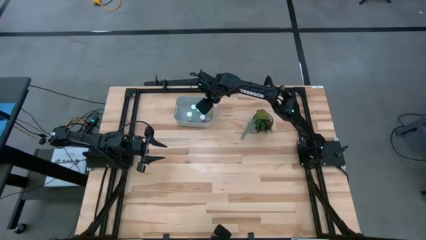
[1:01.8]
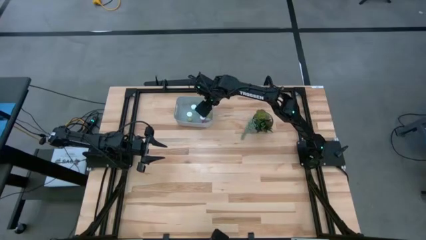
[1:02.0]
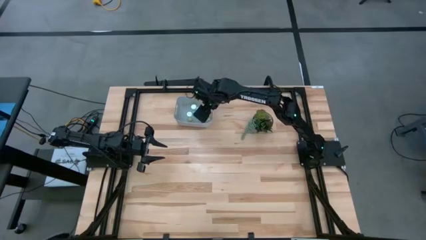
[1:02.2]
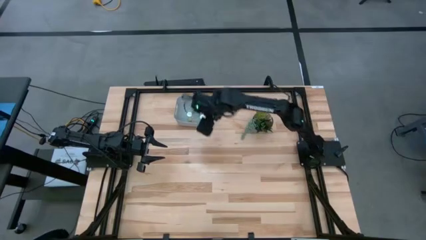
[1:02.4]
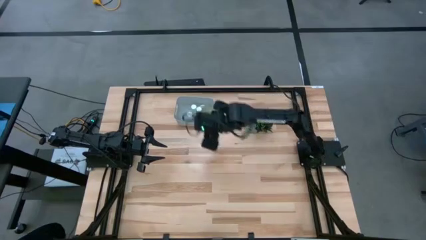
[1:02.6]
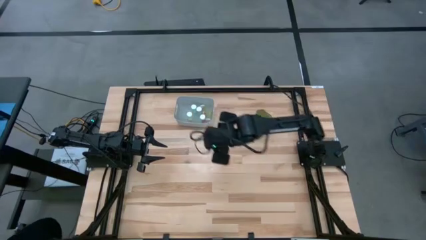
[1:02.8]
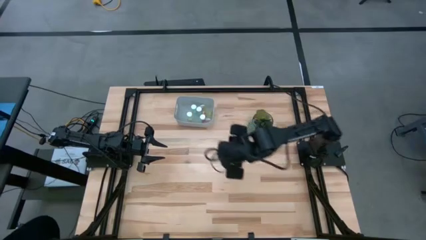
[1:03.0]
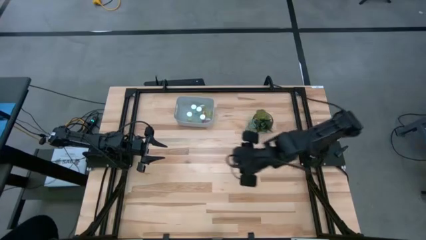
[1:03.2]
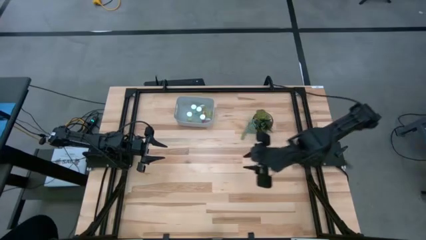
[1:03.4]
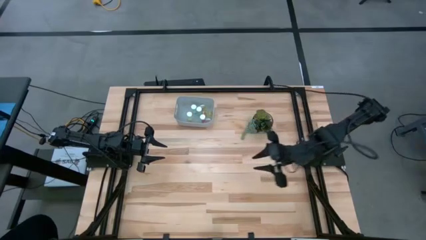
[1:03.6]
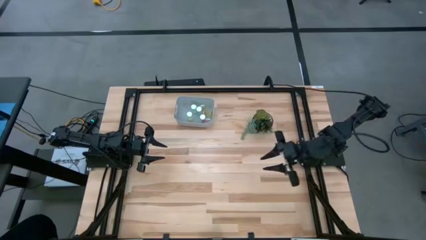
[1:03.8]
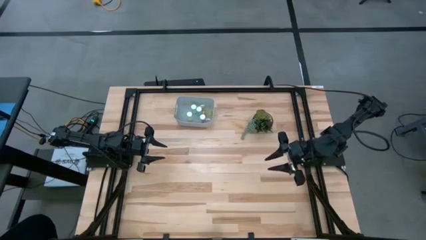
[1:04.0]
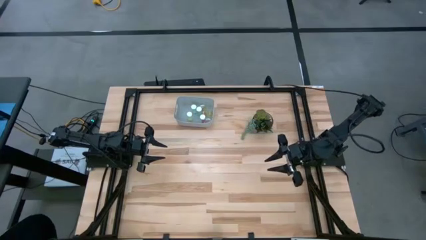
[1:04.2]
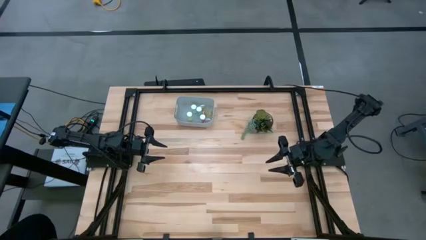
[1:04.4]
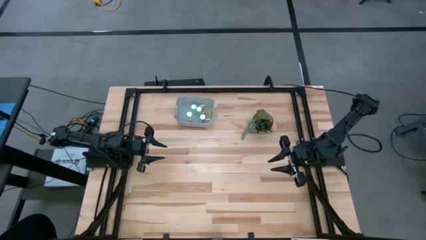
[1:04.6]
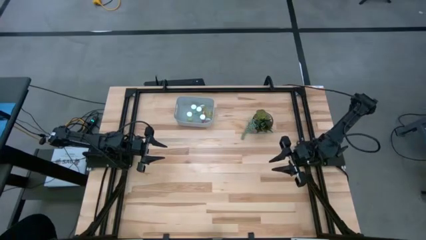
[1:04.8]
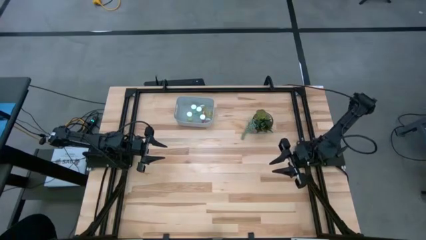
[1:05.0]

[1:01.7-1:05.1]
Task: Pick and place pill bottles into a basket
Return to Home Position

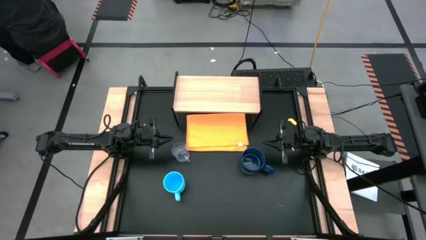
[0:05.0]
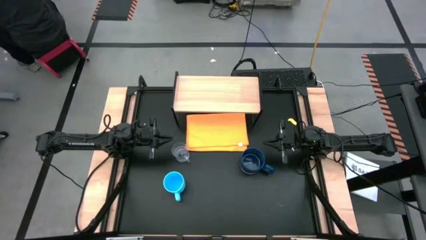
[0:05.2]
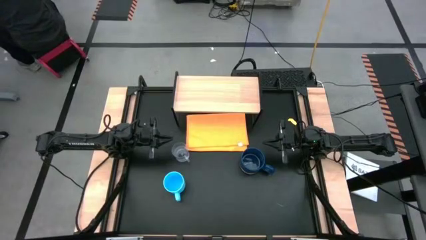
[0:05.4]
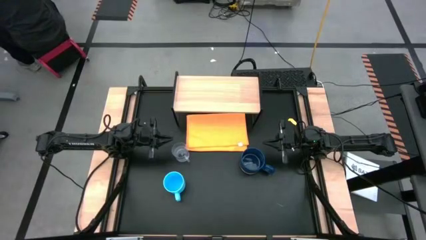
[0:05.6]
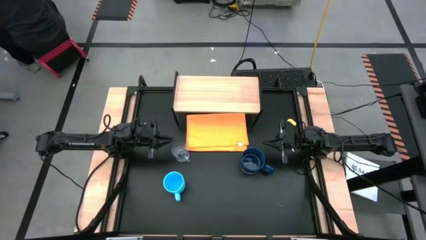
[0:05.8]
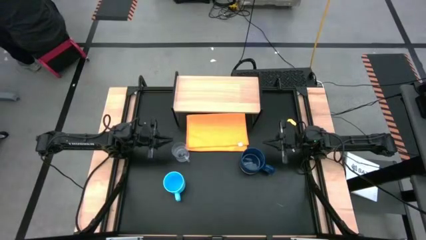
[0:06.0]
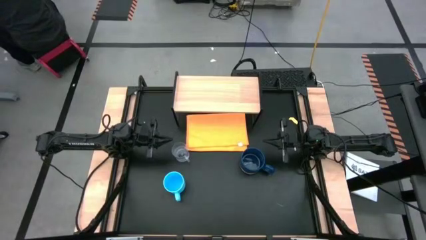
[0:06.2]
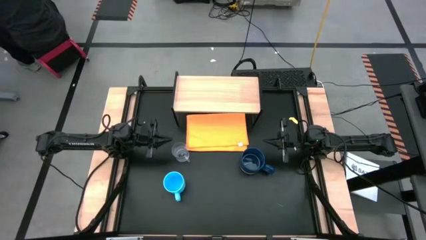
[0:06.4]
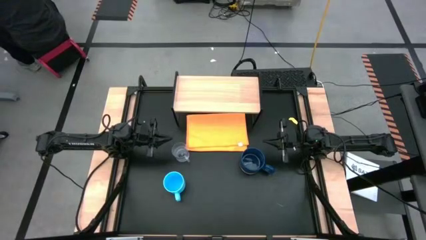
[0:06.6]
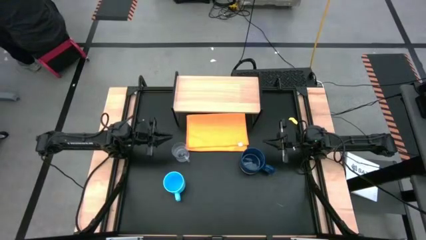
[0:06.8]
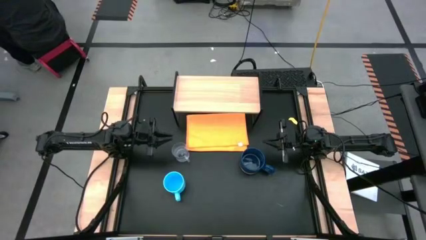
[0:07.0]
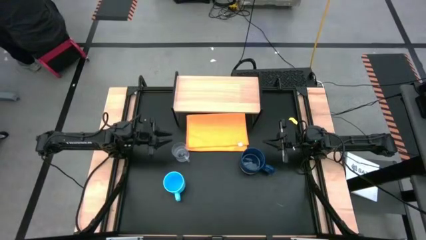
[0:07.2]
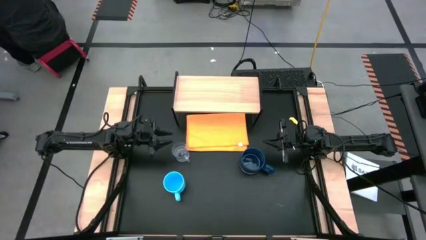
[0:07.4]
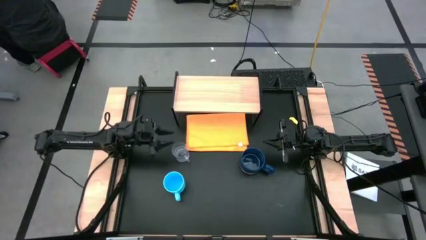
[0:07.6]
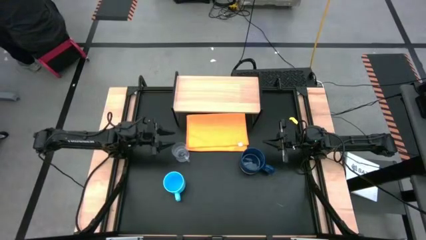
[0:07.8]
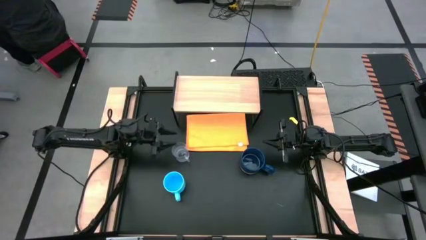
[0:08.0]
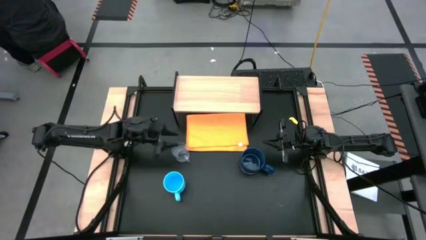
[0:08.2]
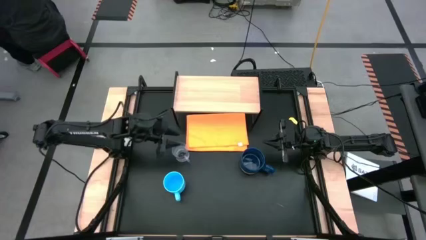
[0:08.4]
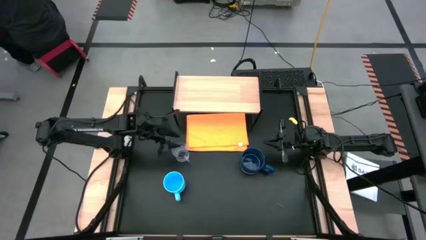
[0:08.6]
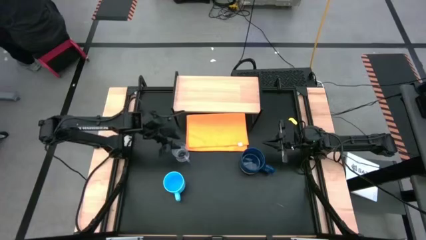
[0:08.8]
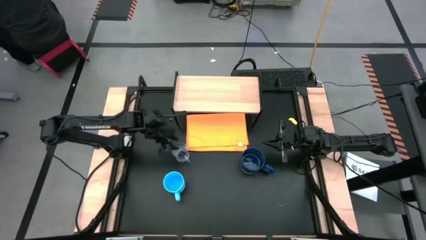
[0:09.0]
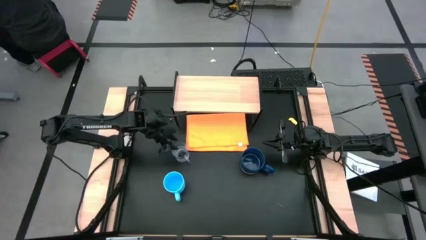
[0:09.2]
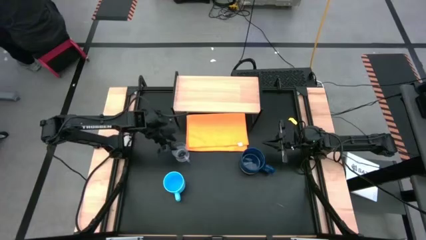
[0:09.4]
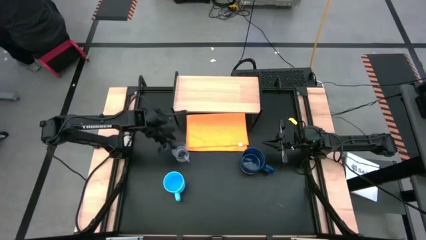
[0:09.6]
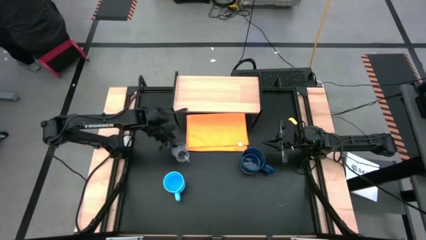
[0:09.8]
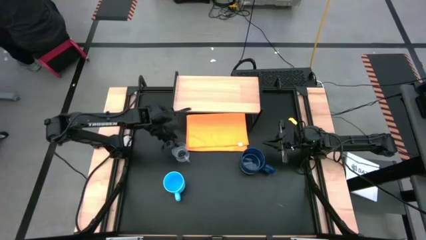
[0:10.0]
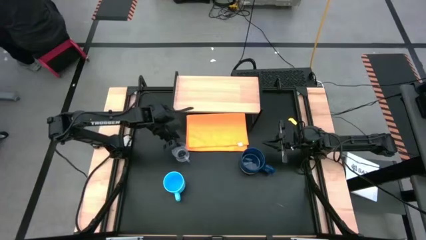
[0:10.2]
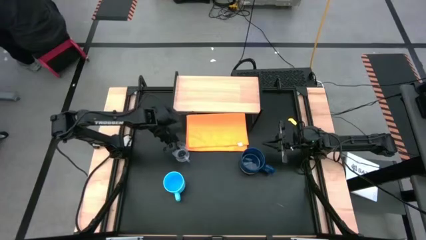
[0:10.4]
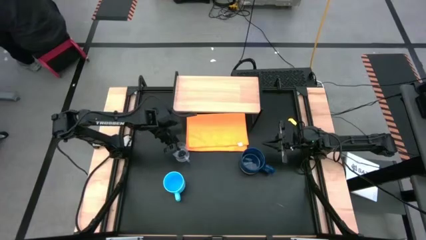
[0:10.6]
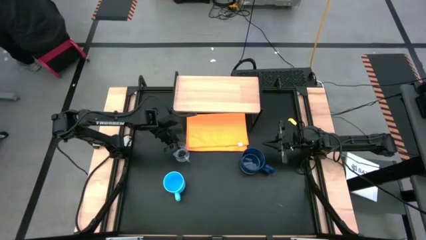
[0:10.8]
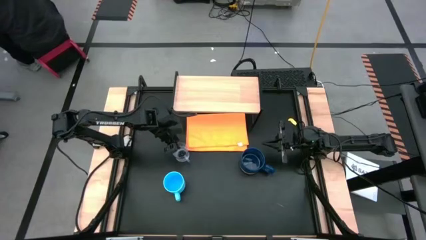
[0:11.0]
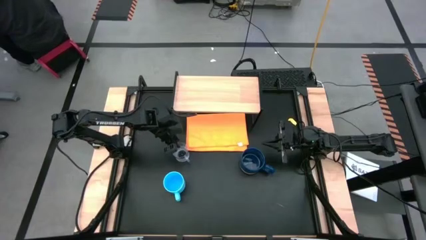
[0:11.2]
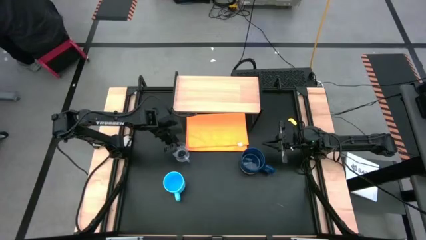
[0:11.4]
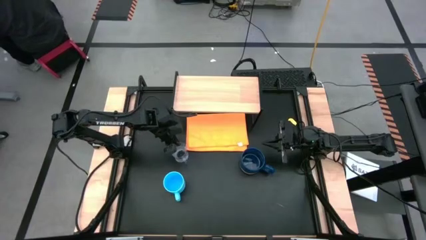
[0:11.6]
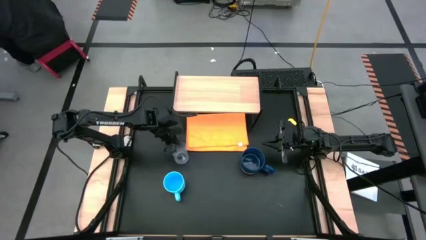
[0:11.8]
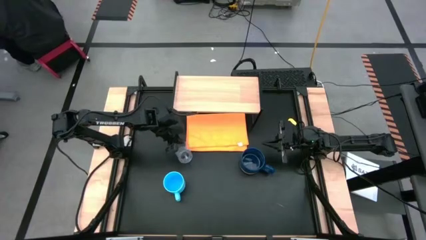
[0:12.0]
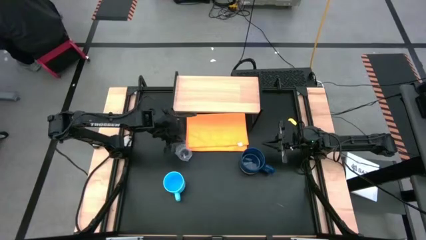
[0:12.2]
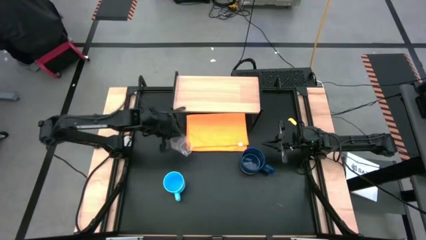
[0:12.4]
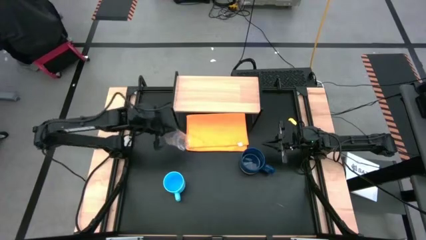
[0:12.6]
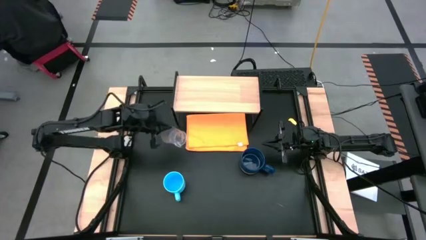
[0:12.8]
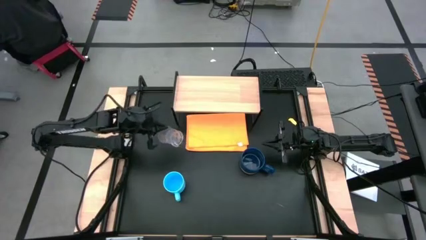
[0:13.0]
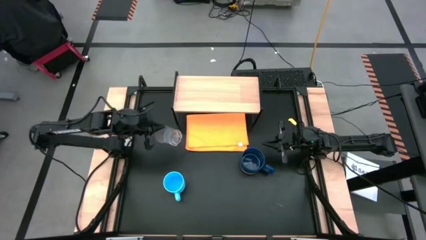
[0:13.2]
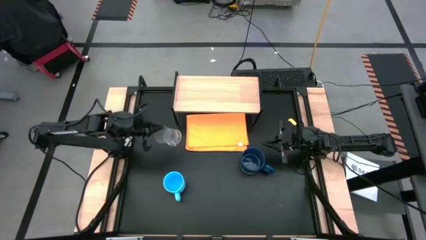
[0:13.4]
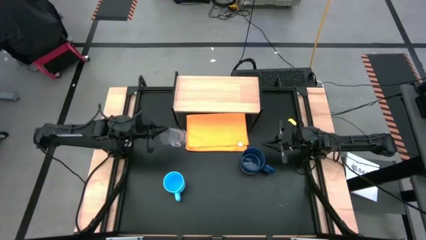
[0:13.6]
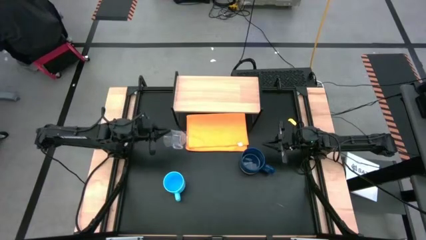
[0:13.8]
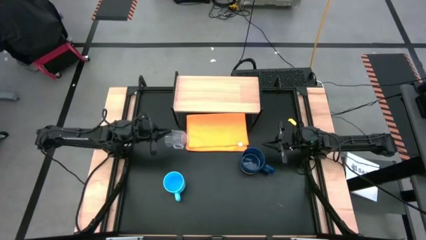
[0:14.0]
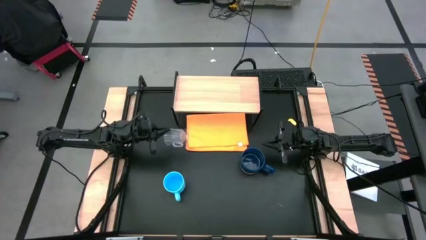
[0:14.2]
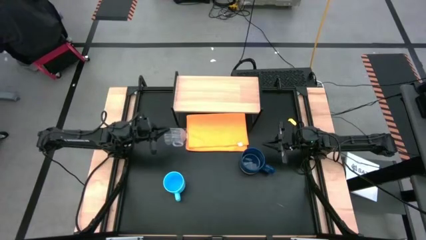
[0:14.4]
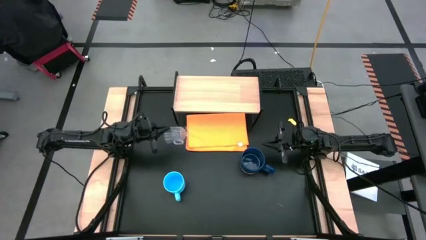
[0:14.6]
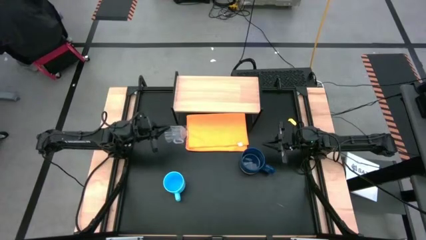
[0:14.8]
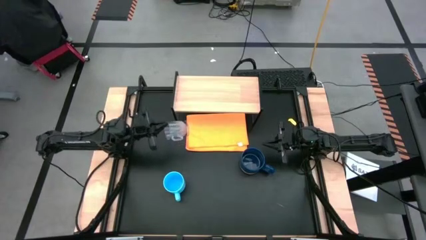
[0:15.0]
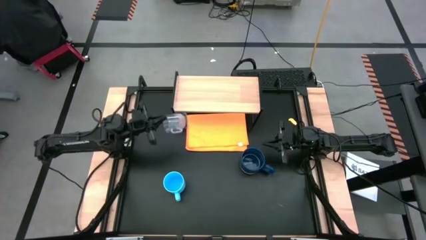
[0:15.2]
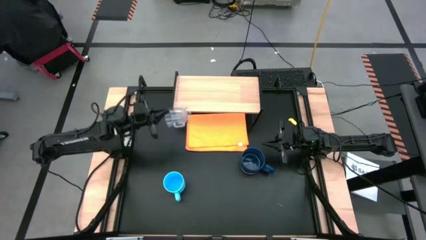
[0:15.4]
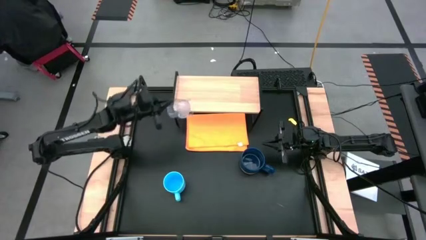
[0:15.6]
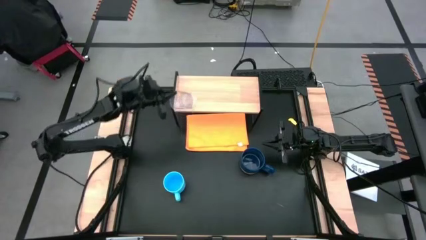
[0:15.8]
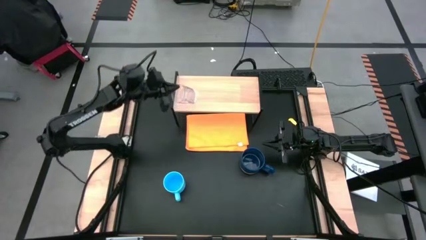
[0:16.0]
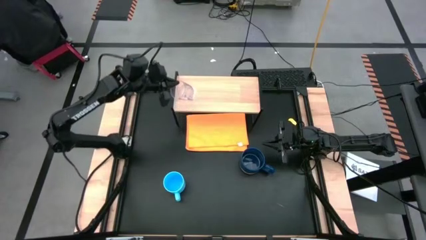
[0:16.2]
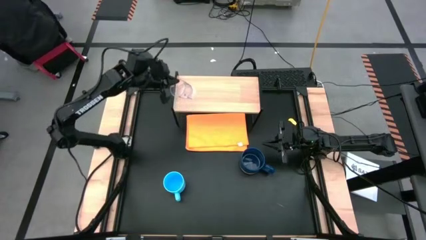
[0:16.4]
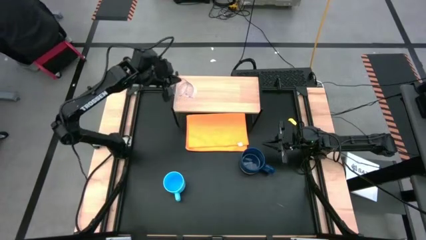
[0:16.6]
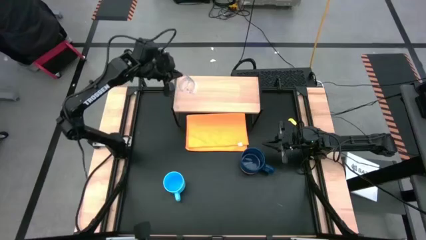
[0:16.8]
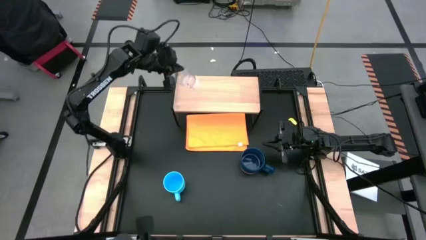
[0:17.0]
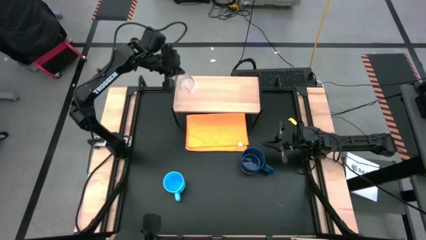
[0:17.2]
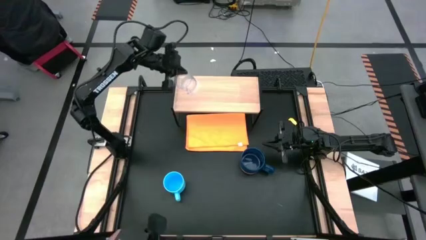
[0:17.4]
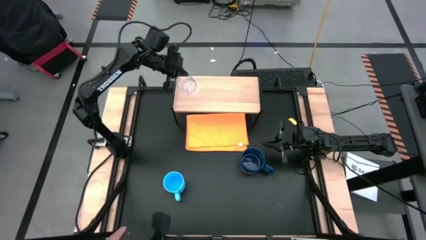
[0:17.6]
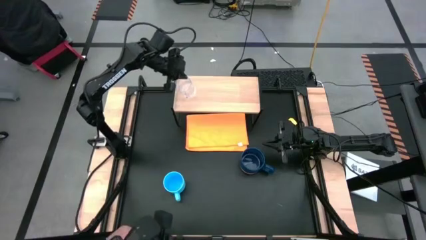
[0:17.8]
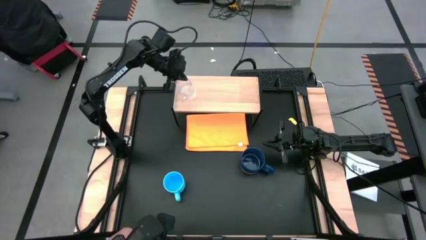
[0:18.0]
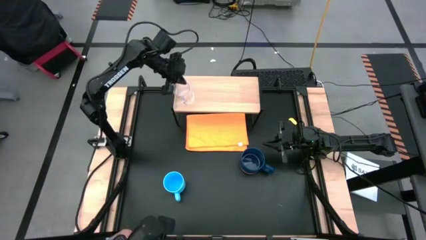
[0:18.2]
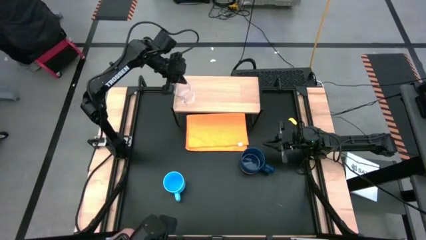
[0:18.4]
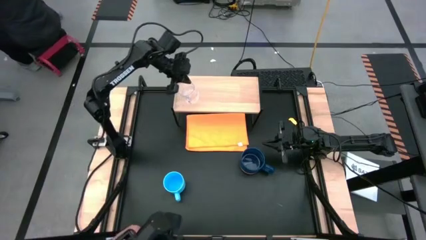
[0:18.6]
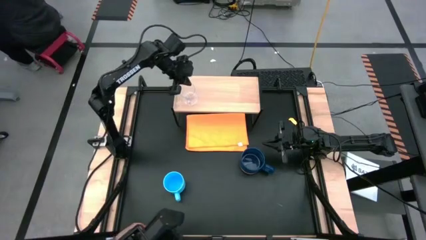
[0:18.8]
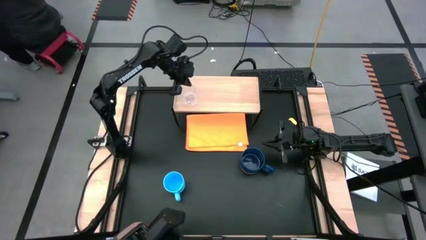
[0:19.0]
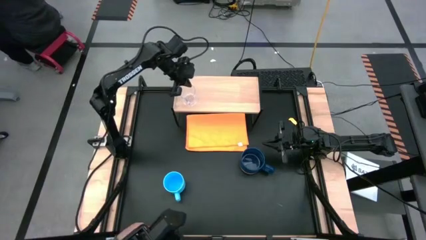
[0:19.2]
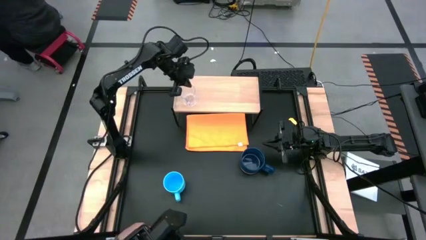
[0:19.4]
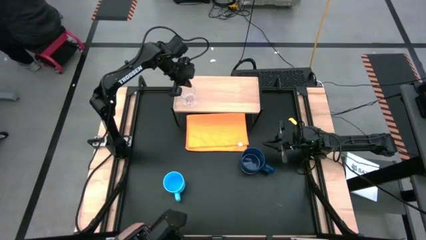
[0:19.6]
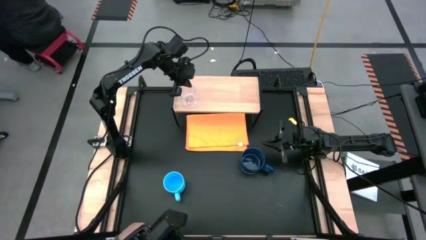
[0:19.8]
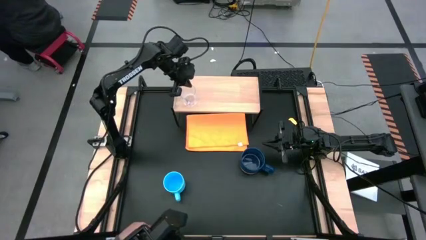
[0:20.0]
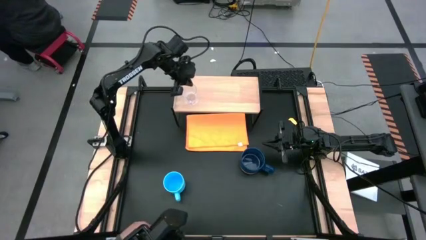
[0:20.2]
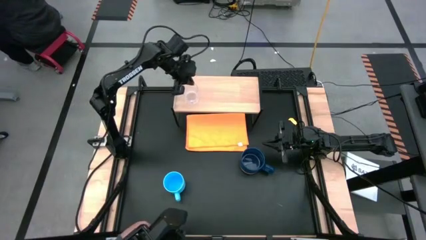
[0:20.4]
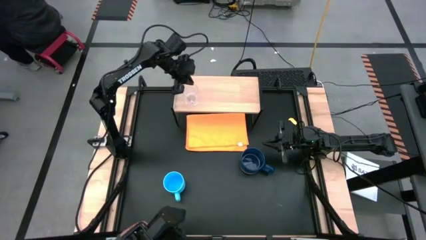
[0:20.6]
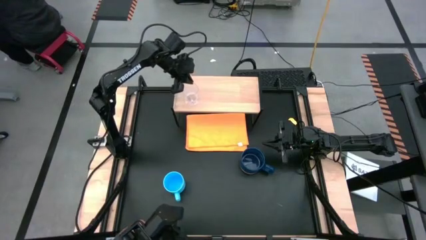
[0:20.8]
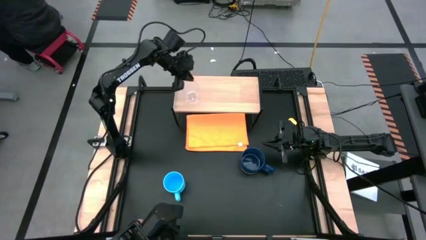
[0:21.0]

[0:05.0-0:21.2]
Task: Stack small to large cups/mugs on shelf
Put the transparent mug on the shelf
